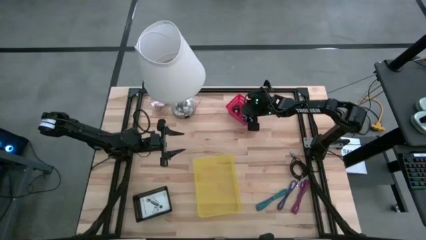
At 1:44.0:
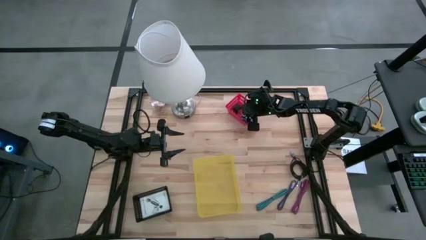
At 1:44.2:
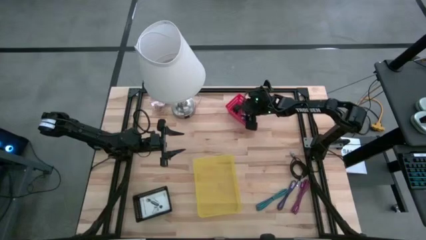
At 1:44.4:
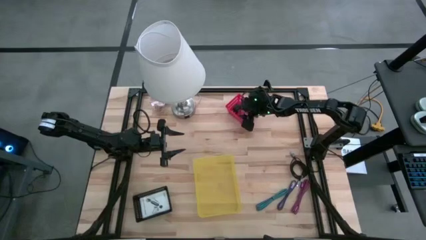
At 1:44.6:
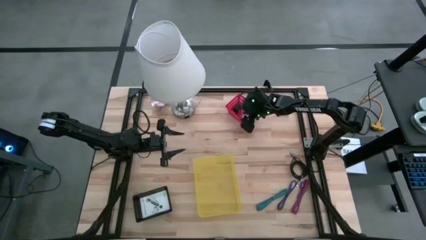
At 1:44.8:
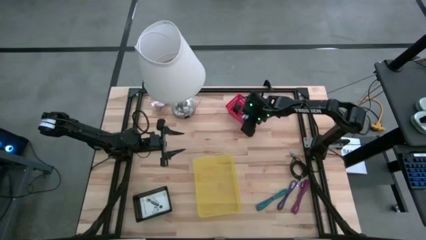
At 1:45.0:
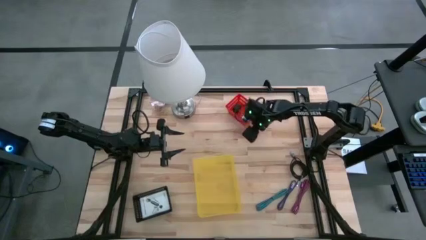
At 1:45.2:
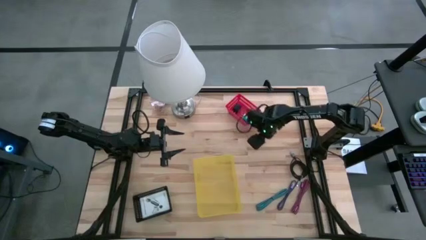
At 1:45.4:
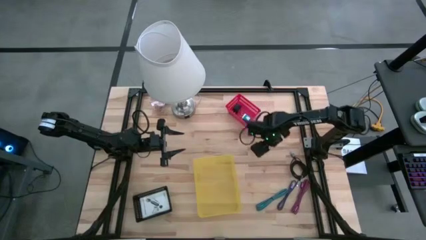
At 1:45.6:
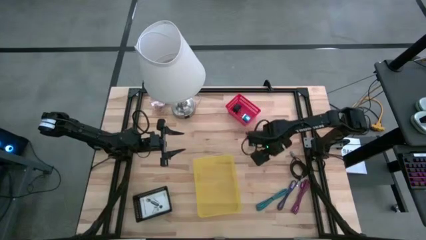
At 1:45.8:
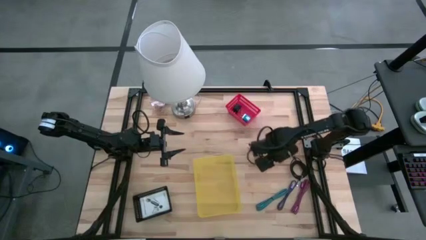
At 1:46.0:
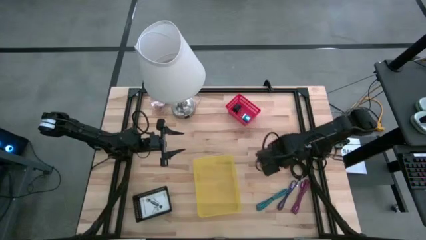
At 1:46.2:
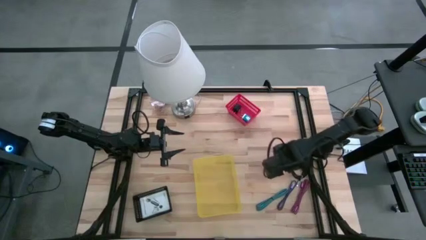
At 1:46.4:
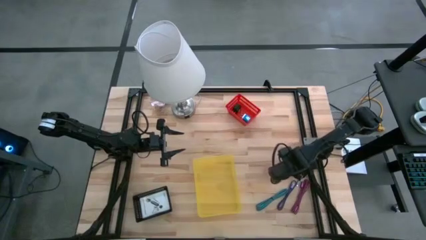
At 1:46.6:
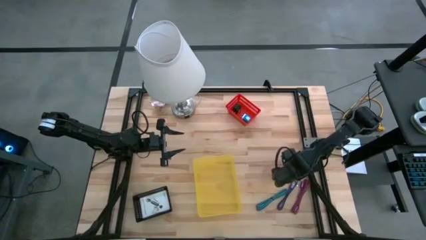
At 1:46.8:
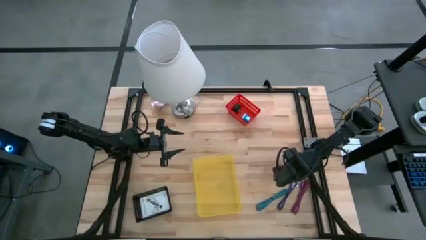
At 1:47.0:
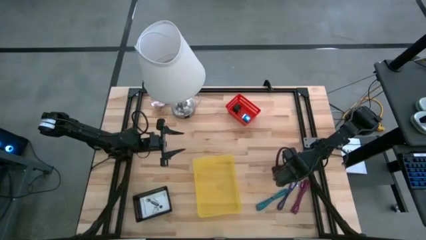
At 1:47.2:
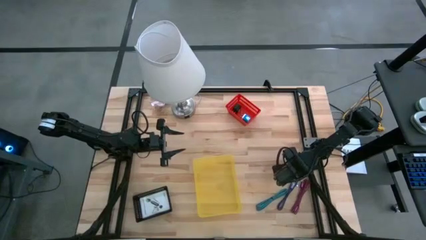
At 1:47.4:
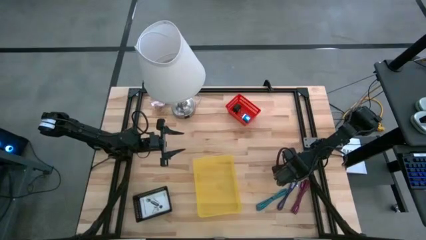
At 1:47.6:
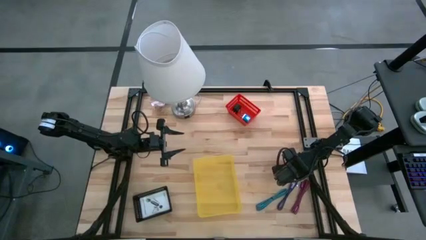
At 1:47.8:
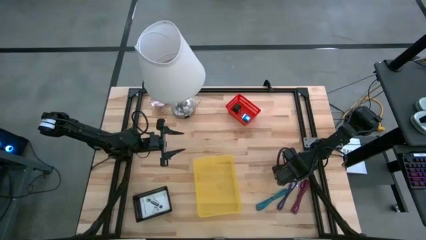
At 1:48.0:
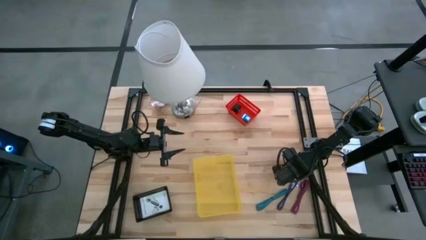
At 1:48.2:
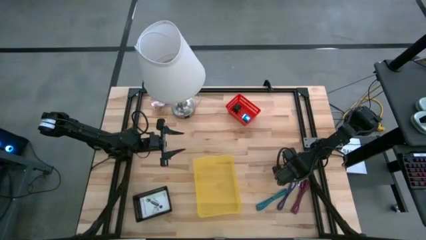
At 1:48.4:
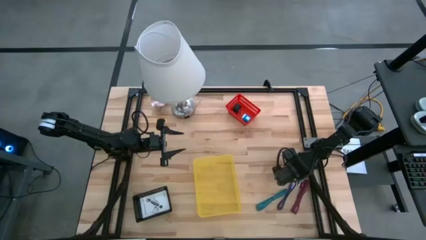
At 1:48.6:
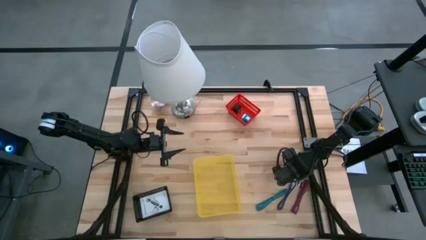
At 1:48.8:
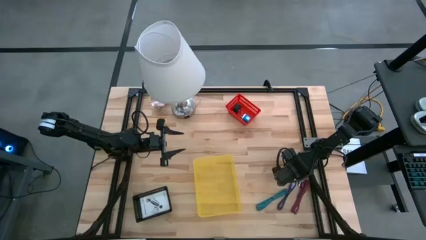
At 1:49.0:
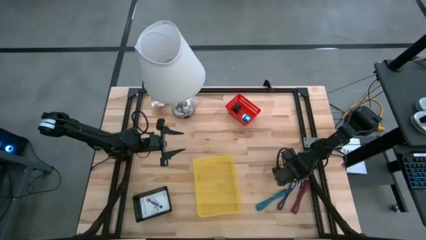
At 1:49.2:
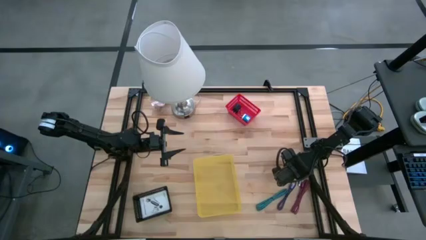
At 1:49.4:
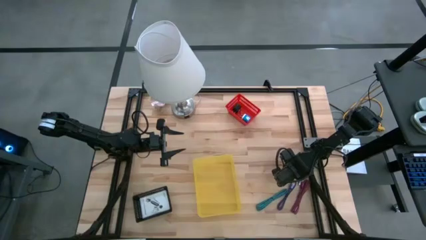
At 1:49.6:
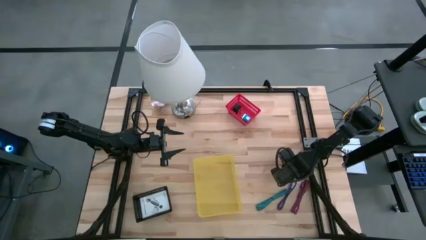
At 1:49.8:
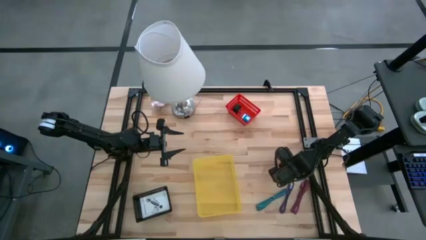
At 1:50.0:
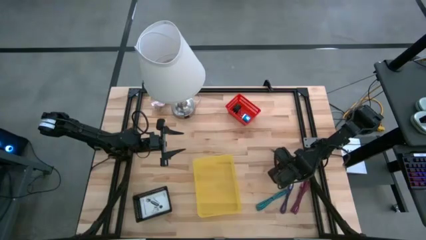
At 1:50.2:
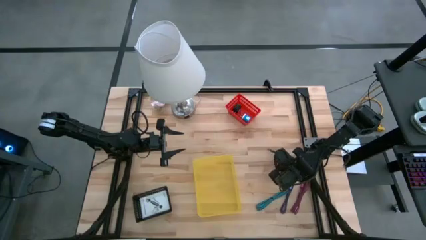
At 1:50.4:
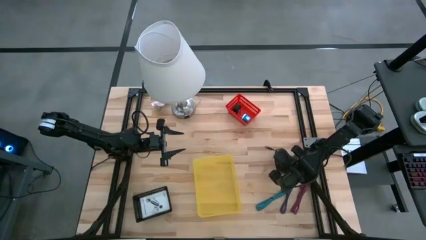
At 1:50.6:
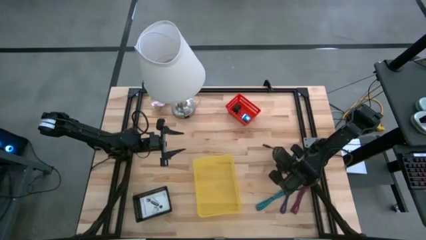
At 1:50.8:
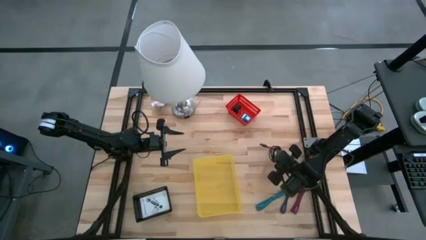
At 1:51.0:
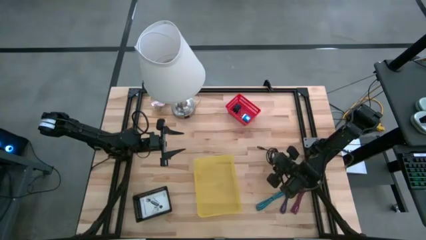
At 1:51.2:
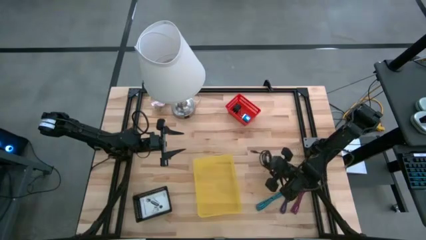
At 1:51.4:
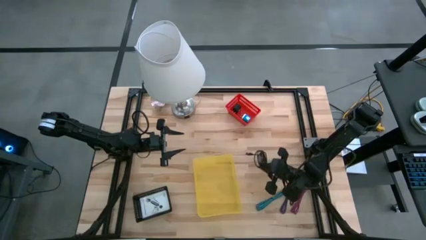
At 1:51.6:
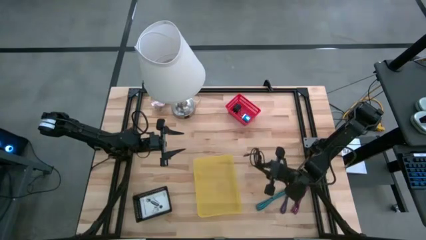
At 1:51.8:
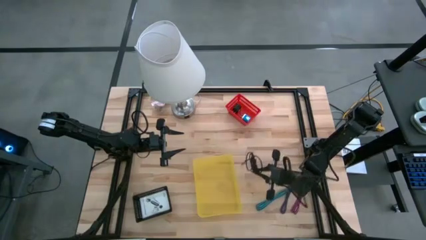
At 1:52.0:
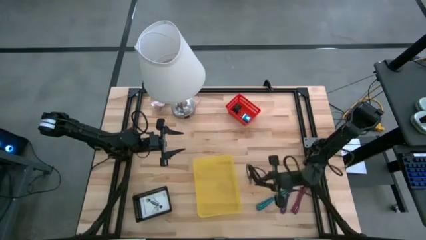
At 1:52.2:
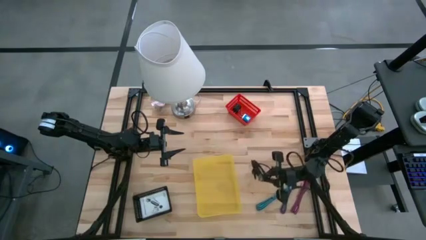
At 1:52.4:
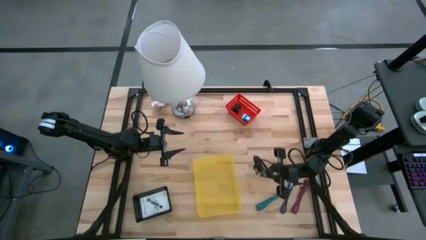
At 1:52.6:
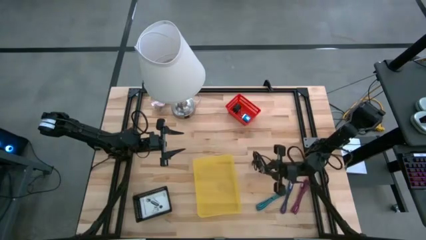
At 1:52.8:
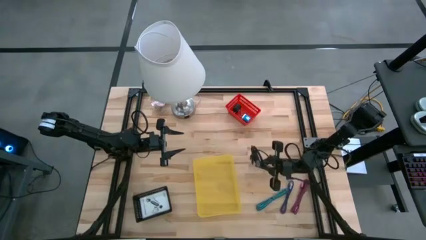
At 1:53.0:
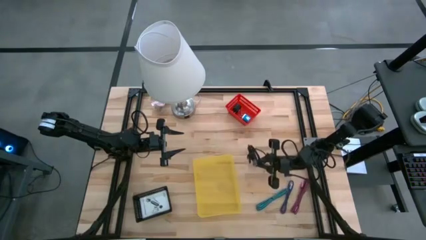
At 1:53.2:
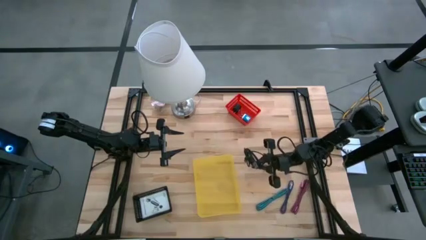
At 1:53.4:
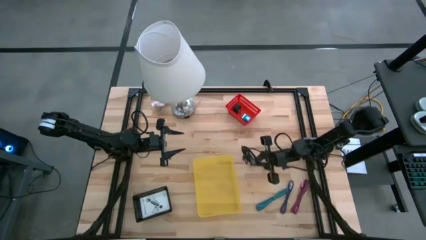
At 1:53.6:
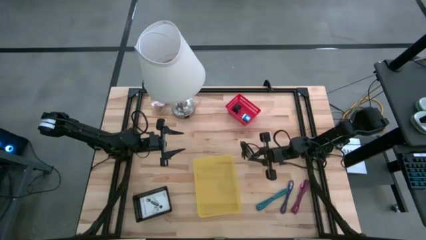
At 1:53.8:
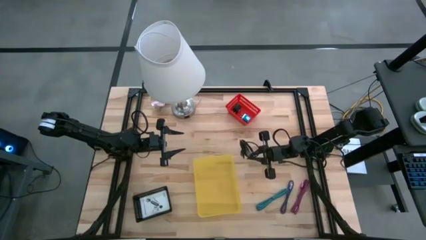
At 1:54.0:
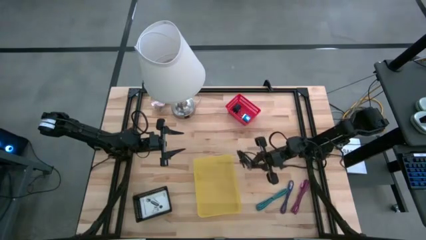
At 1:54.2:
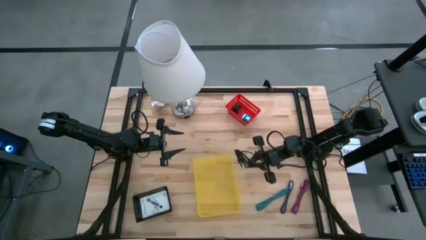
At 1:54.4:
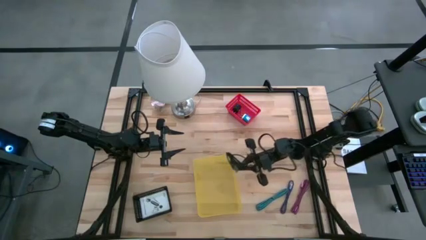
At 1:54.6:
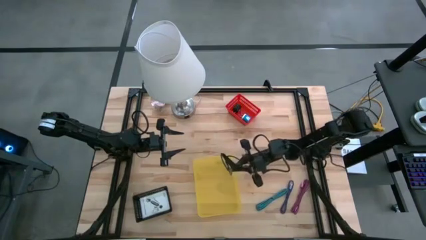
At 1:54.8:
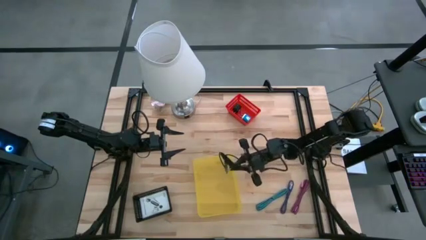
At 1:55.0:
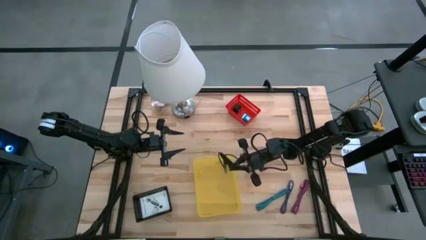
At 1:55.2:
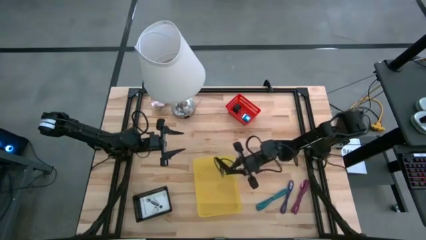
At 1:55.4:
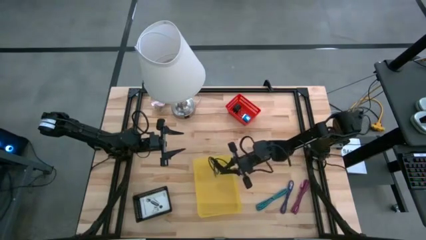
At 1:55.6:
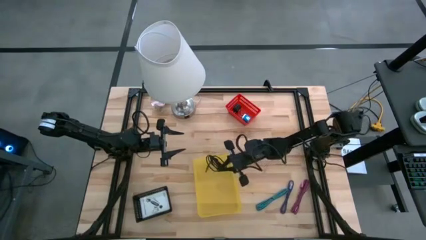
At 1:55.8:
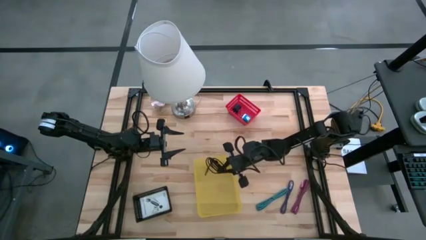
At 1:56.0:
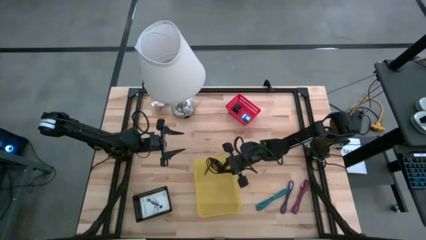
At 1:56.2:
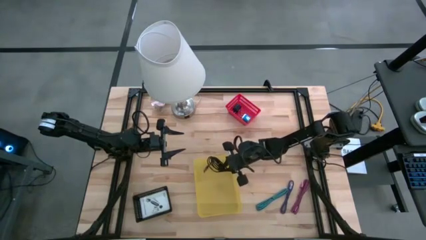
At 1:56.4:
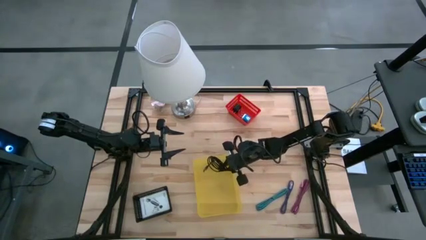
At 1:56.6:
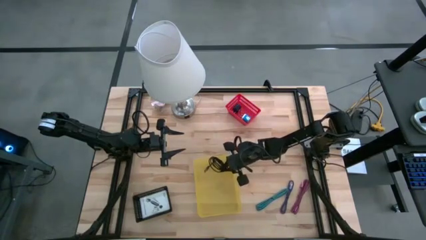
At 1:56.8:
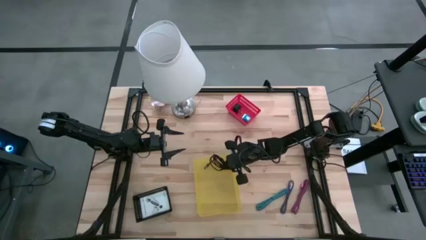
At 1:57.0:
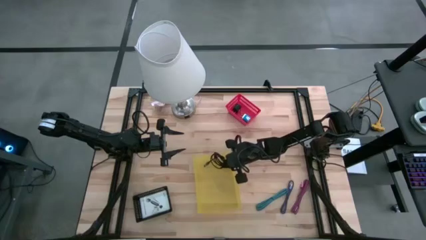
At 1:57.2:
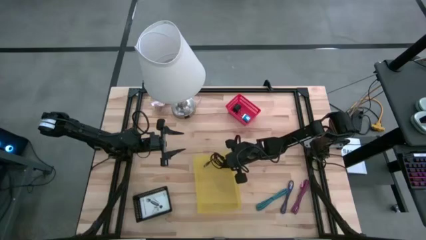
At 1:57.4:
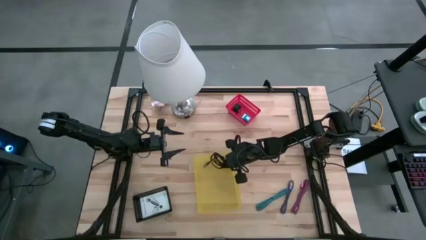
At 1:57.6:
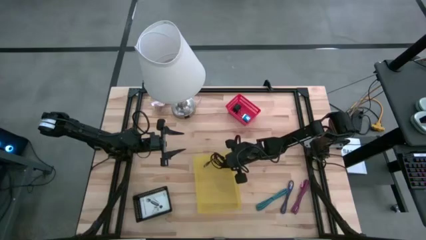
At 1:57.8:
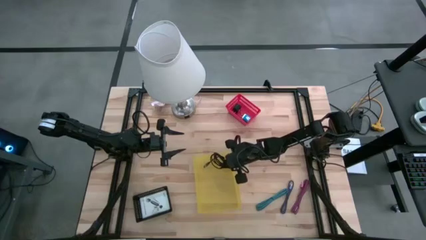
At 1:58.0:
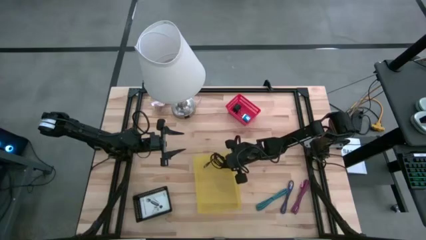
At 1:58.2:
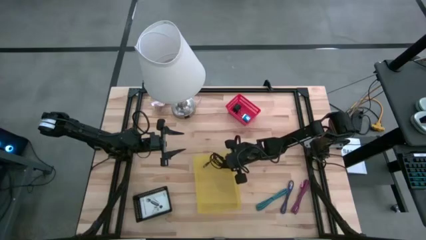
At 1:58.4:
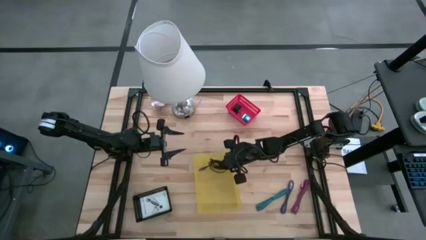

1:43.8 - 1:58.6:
Task: Pick and place items into bin
Put the black charger cable into the yellow bin

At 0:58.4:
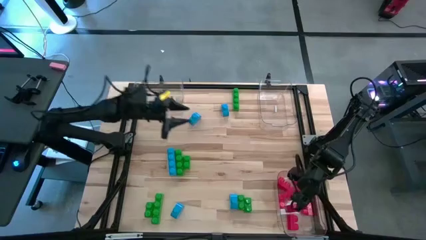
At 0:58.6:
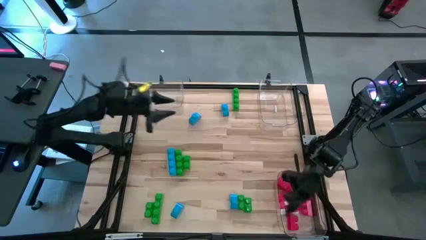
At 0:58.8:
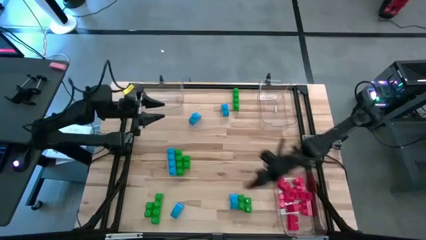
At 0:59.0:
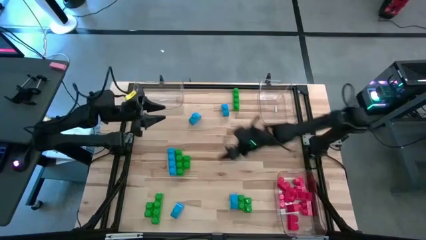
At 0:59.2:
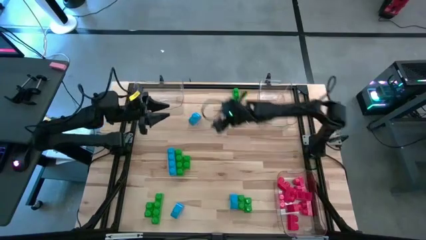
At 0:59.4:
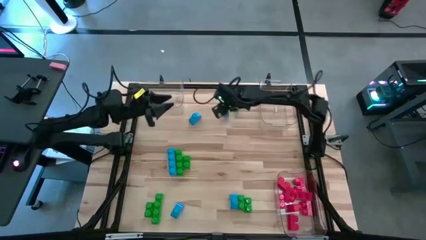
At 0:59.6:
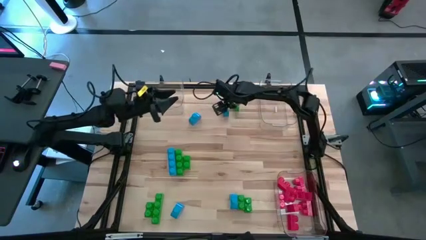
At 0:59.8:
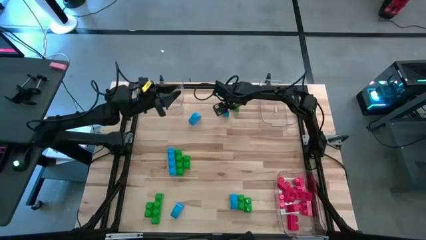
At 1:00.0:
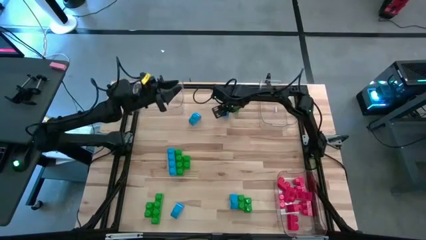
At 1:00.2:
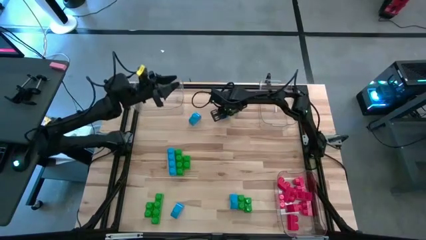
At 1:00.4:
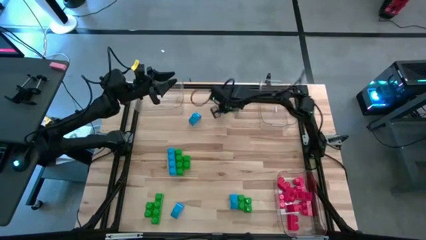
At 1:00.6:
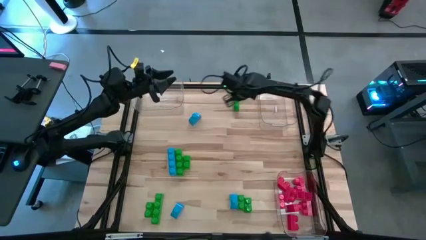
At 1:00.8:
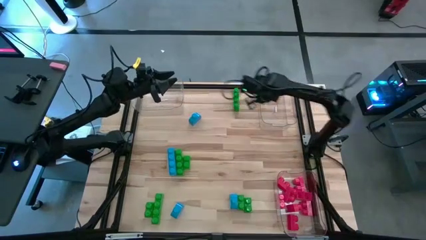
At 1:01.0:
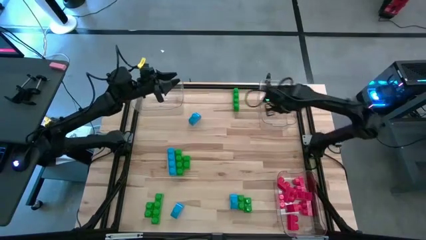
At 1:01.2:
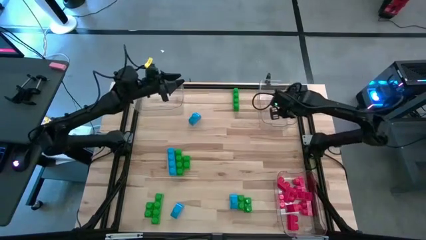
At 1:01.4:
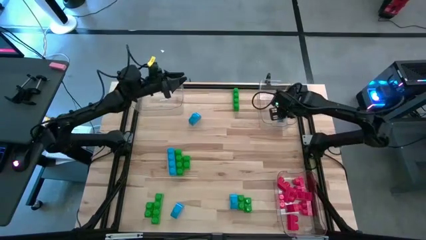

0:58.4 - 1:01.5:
Task: Sort blocks
Put the blue game piece into the top right transparent bin
